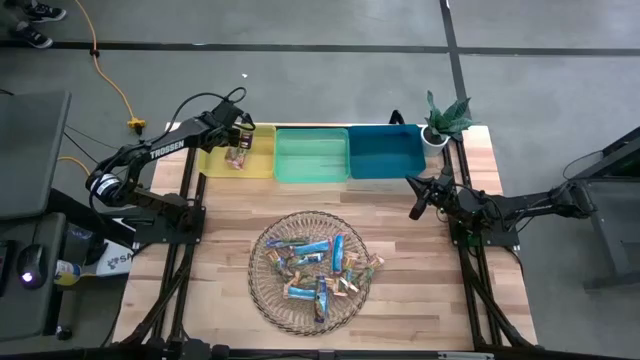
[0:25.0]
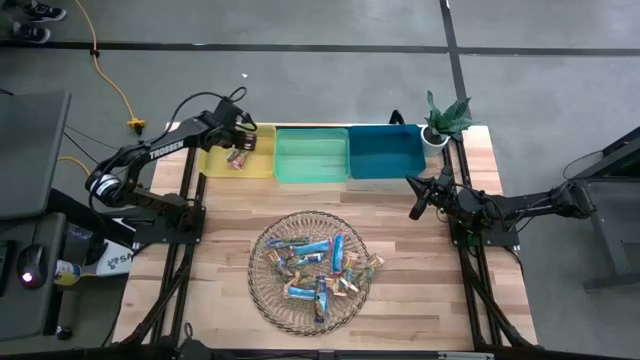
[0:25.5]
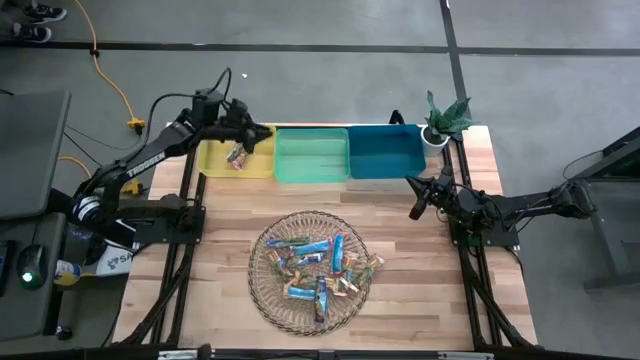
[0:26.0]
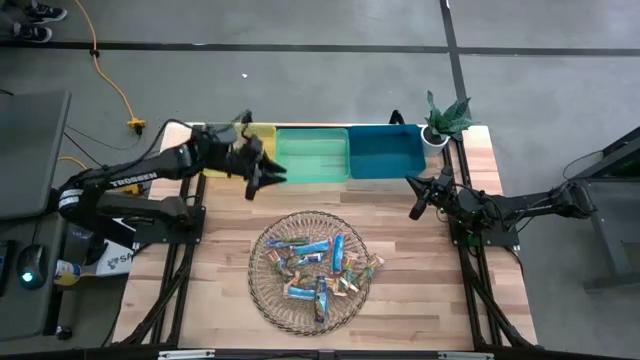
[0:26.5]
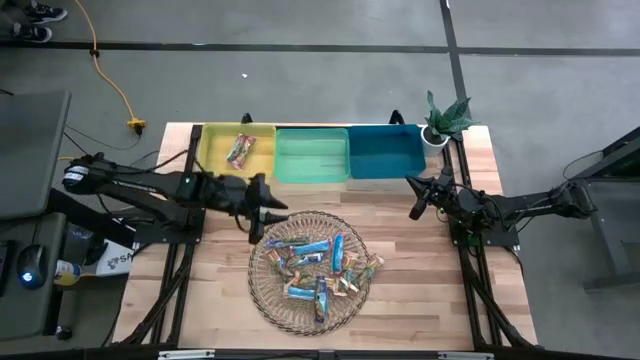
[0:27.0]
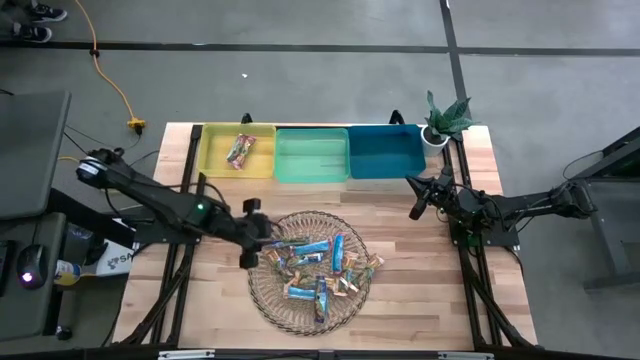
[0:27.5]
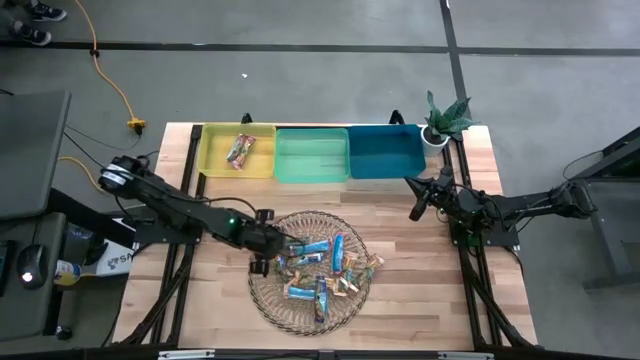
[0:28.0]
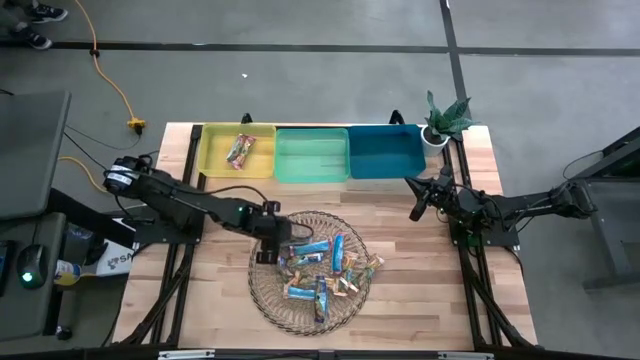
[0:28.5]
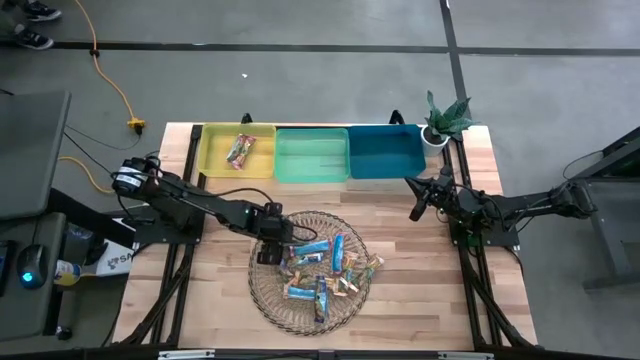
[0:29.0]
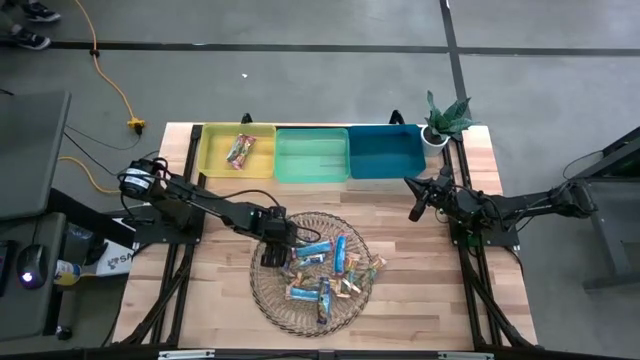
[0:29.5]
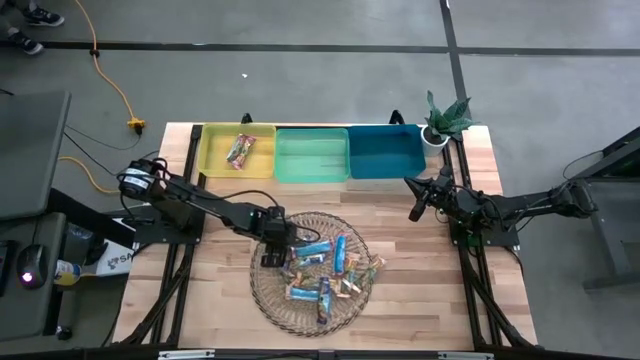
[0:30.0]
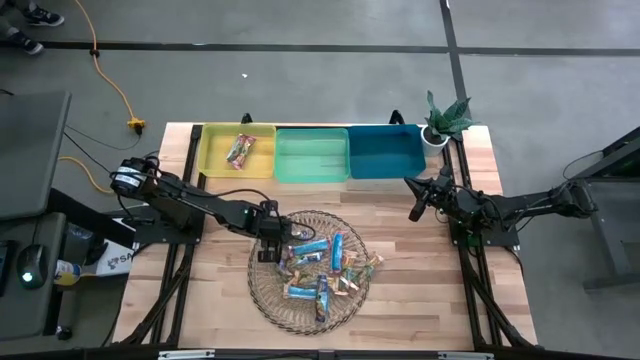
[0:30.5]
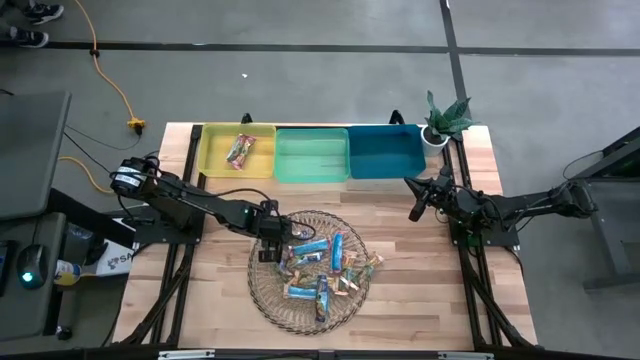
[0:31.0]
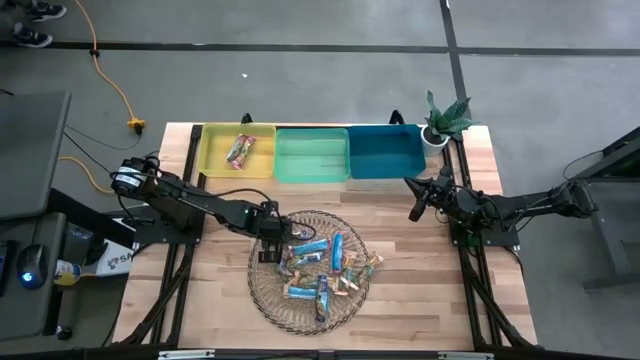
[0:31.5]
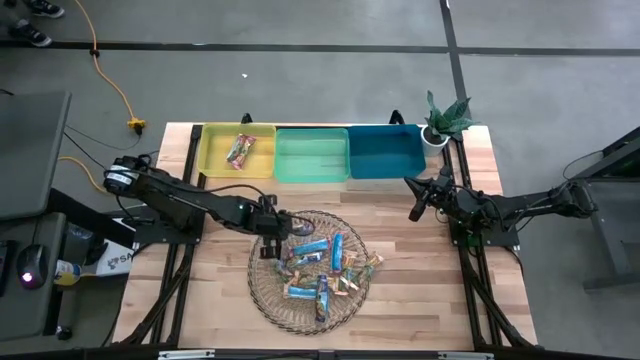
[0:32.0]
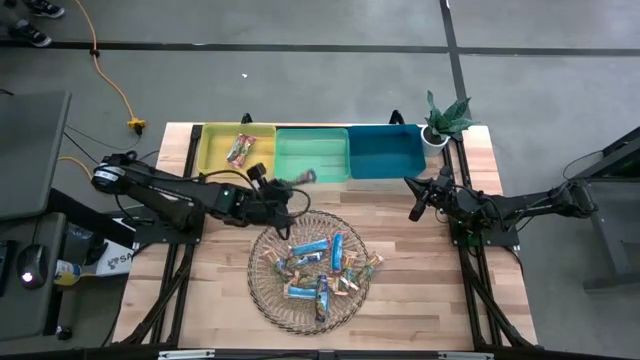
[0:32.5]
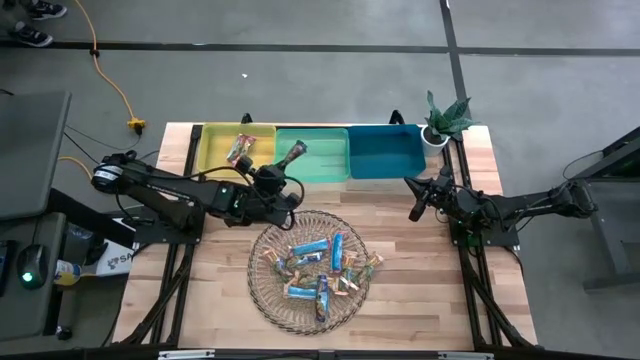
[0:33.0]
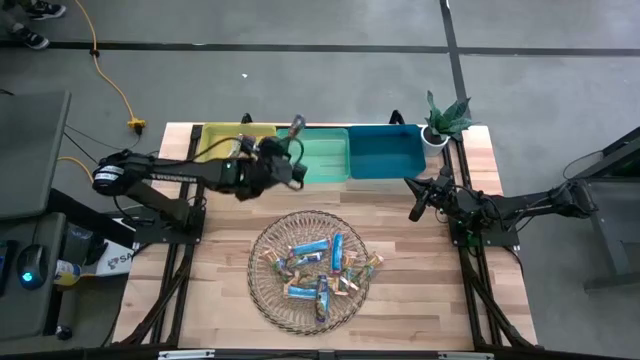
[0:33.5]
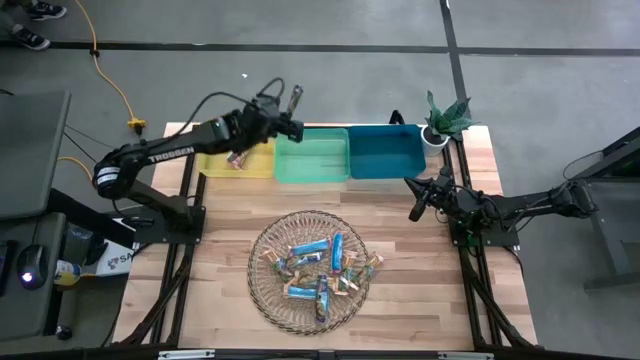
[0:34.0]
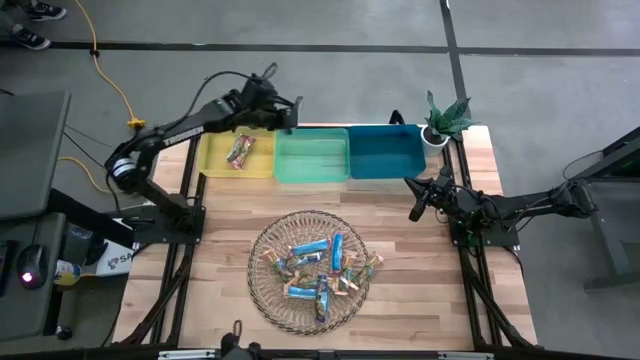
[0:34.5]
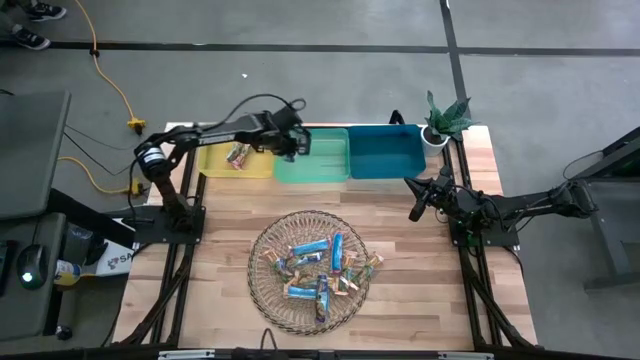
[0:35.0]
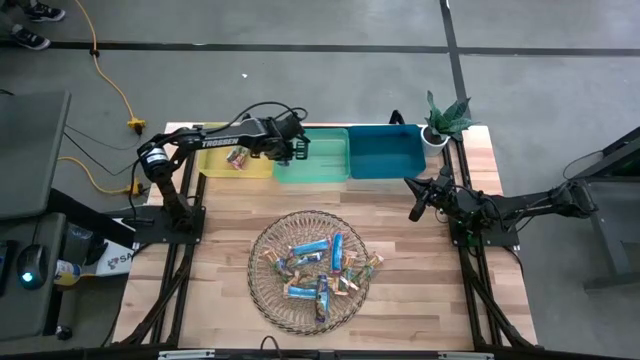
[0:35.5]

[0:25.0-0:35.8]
Task: Pick and place Granola Bars by type
Put the blue granola bar into the green bin

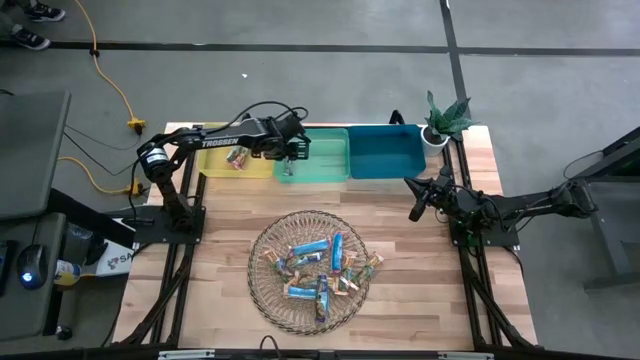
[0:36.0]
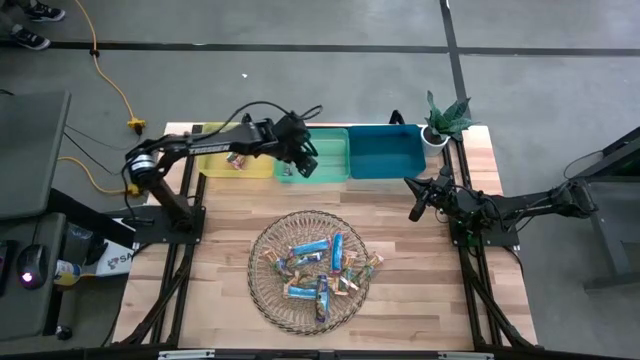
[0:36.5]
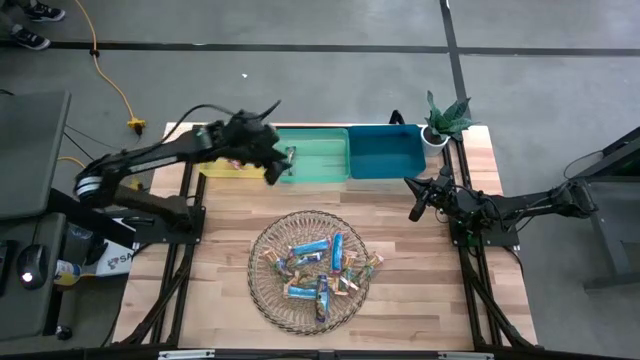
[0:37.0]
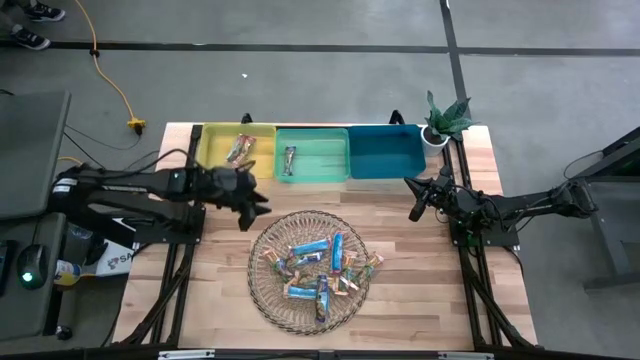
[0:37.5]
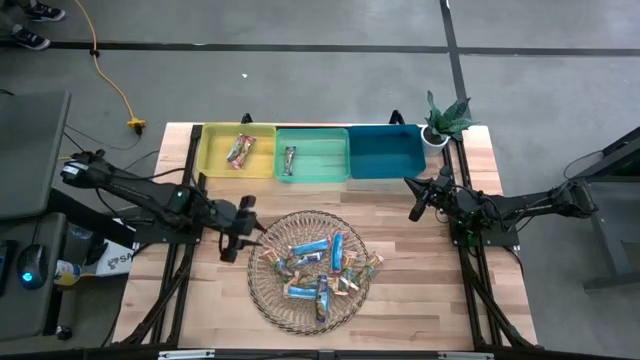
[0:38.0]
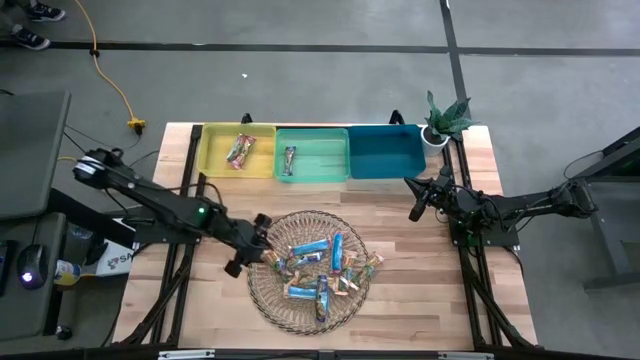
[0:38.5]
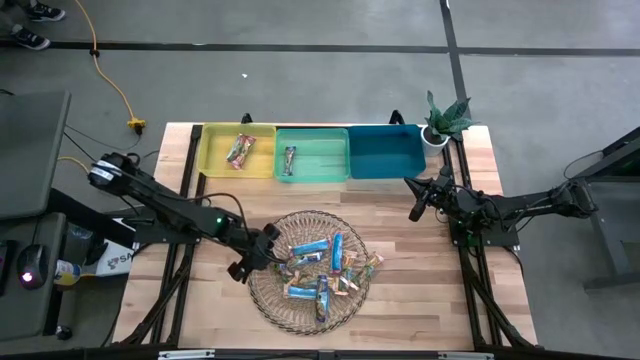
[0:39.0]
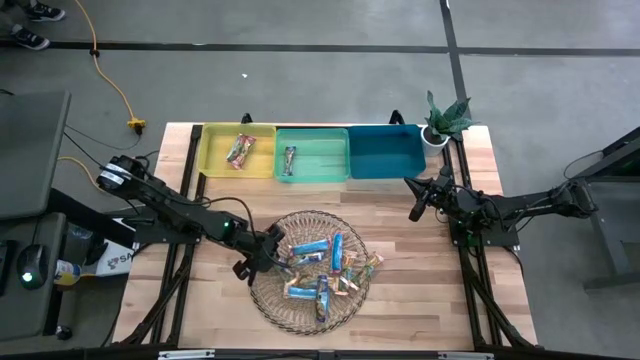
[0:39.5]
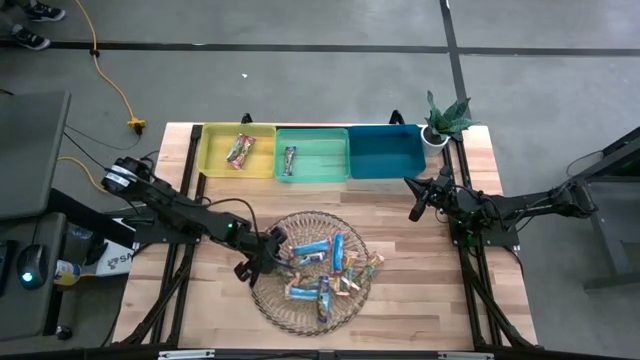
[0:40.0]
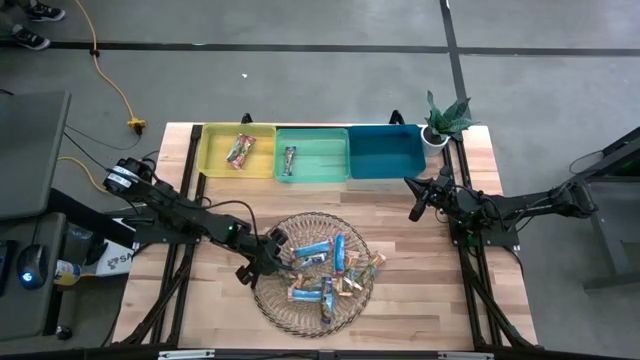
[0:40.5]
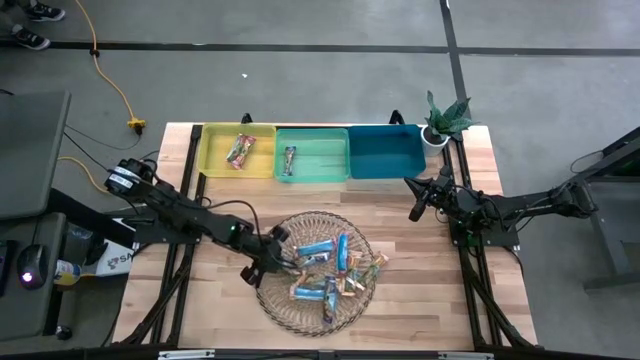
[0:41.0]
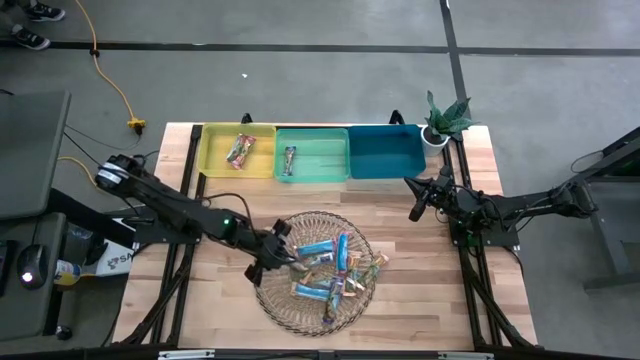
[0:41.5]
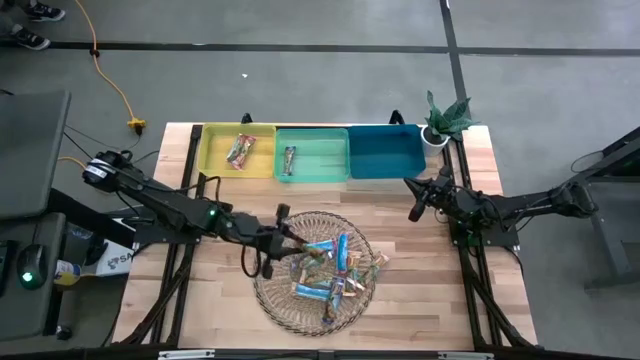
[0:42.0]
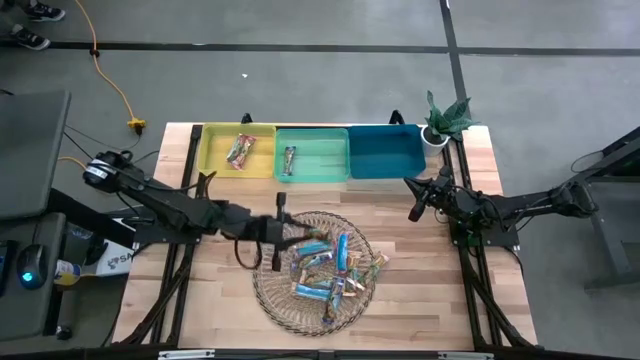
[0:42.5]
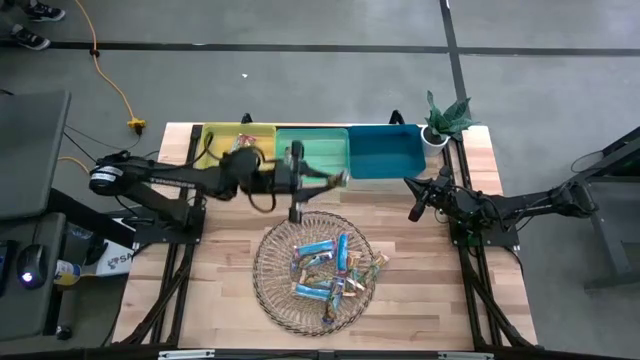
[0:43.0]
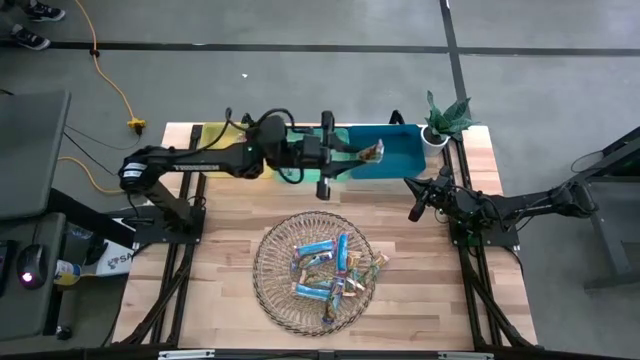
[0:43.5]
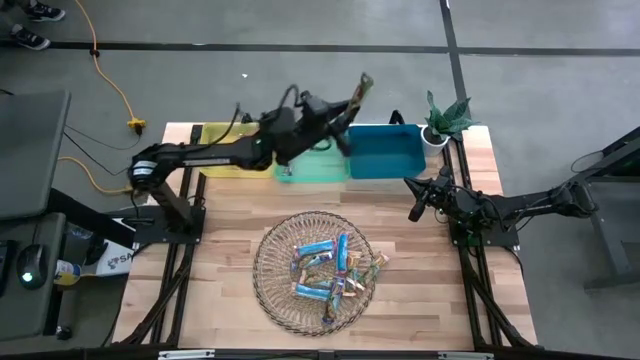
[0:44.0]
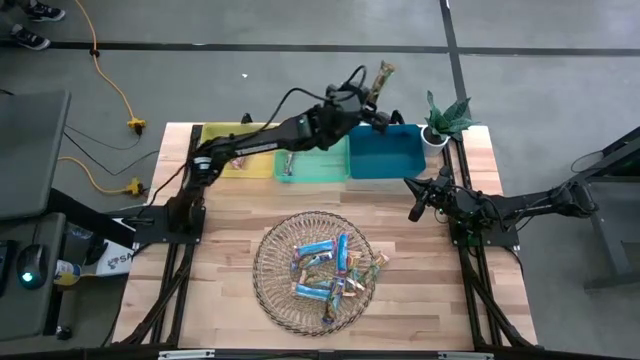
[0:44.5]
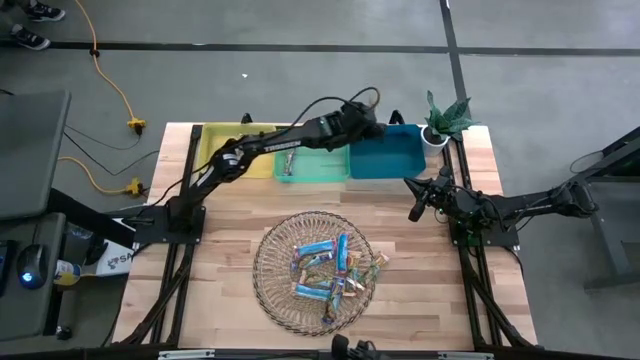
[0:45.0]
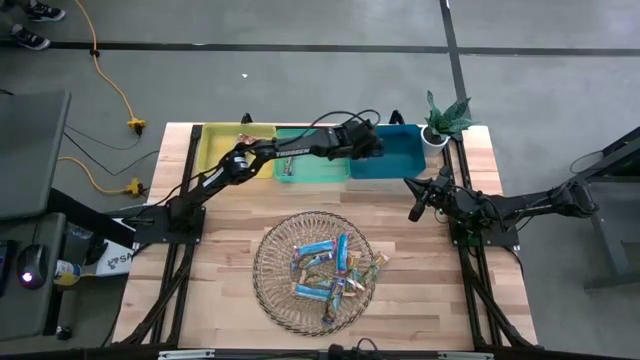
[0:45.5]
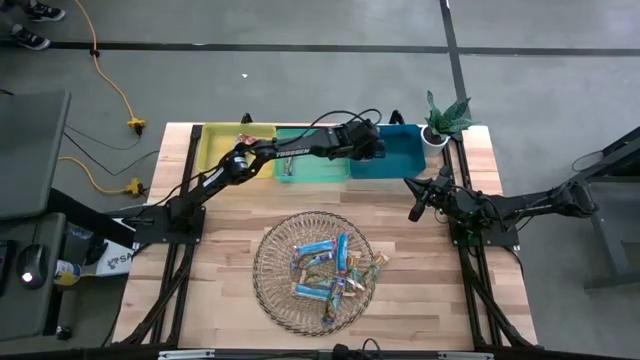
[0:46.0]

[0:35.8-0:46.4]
Put the yellow granola bar into the blue bin

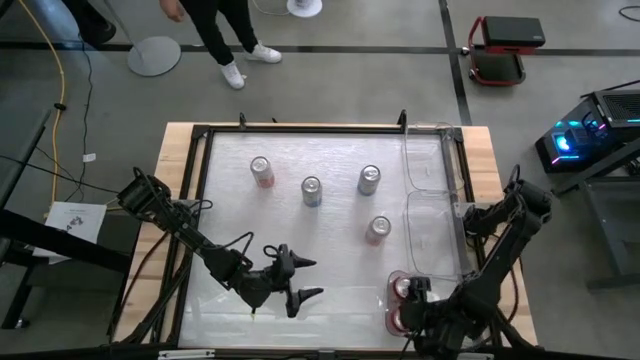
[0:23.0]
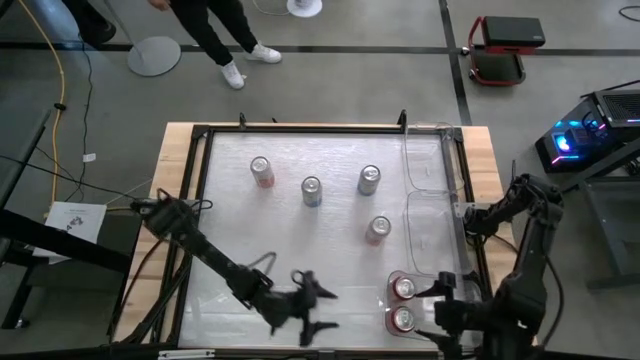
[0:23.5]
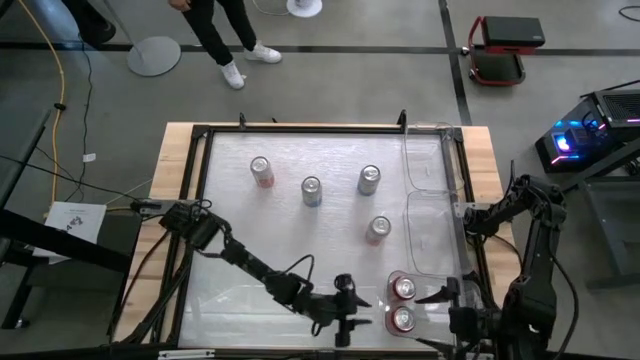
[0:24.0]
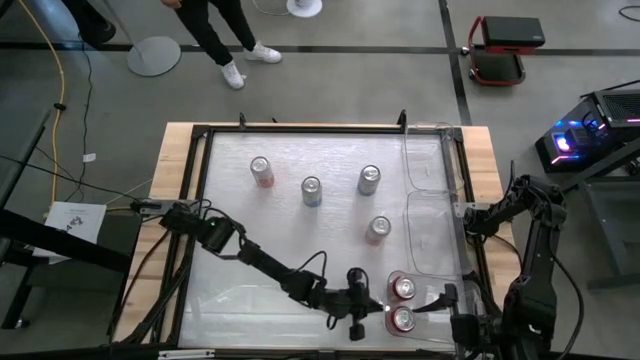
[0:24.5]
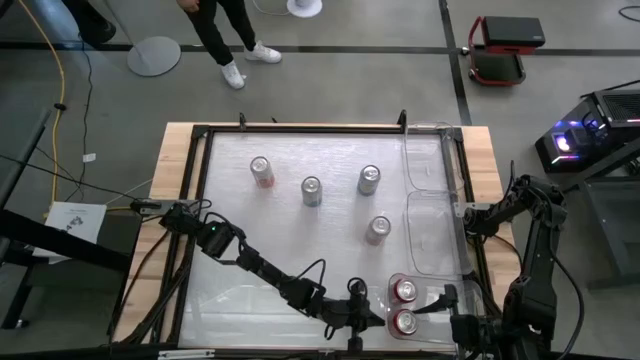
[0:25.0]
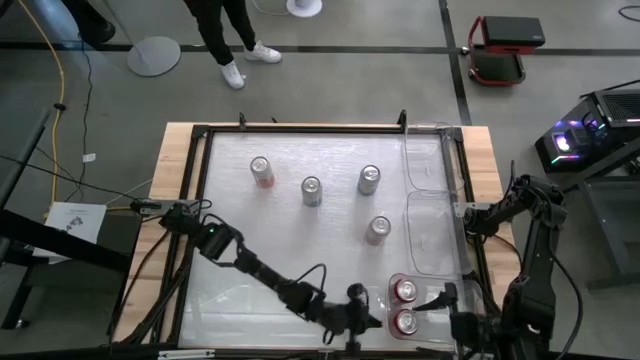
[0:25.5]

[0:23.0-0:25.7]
Task: Sort soda cans
Adjust the bottom transparent bin
